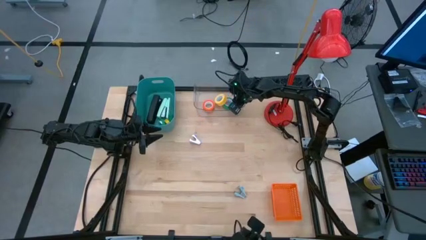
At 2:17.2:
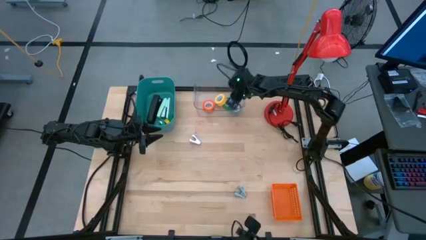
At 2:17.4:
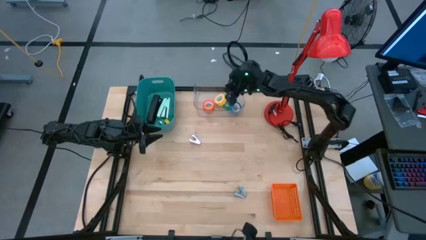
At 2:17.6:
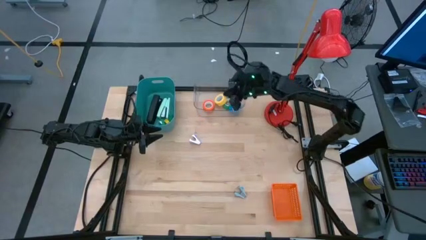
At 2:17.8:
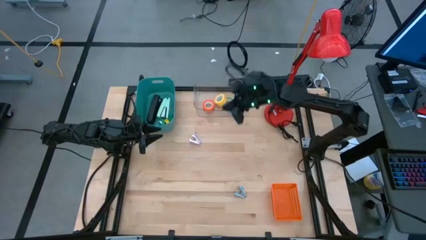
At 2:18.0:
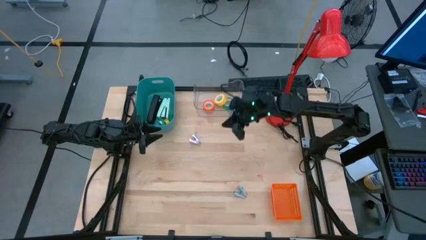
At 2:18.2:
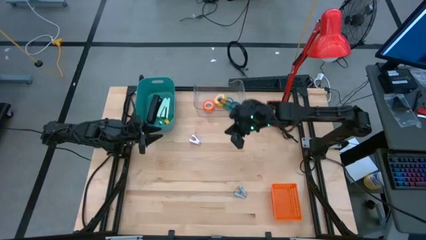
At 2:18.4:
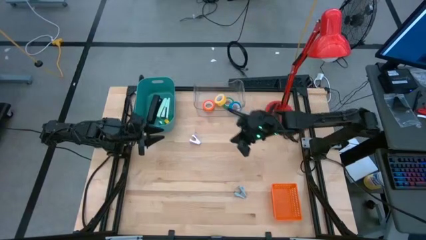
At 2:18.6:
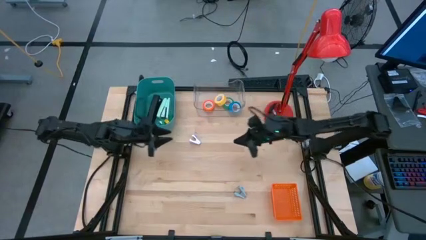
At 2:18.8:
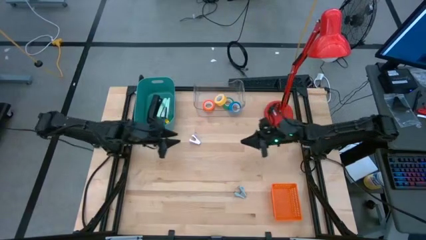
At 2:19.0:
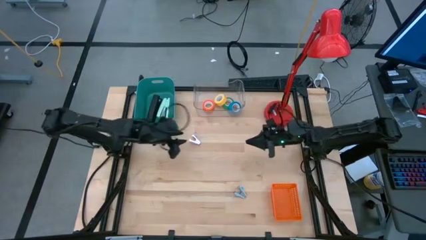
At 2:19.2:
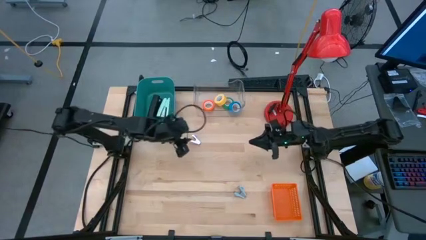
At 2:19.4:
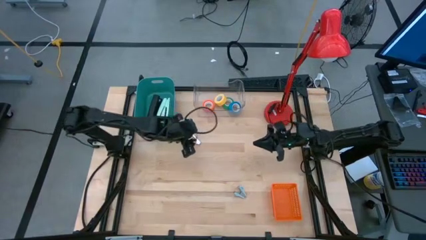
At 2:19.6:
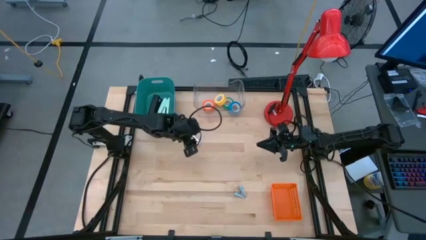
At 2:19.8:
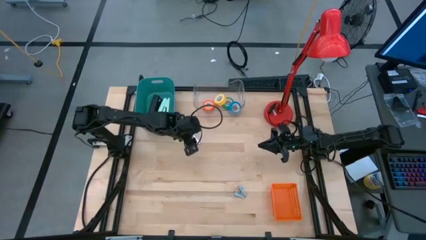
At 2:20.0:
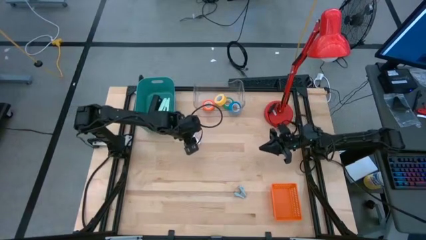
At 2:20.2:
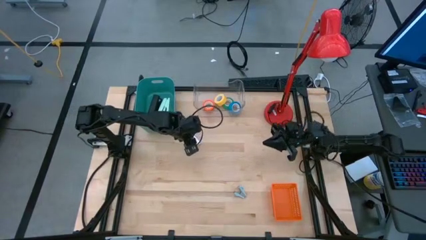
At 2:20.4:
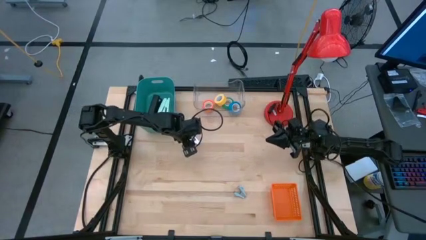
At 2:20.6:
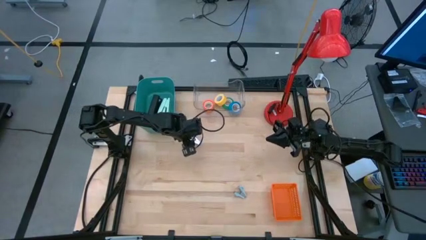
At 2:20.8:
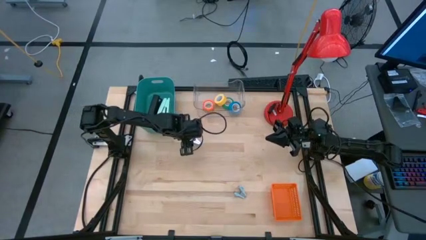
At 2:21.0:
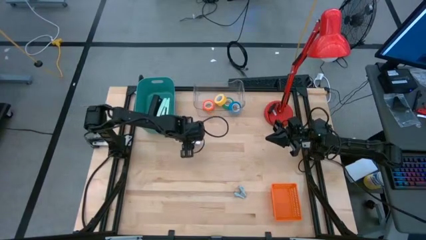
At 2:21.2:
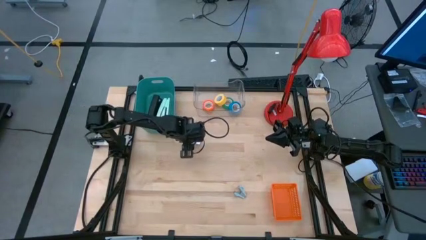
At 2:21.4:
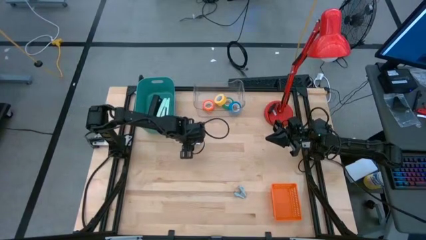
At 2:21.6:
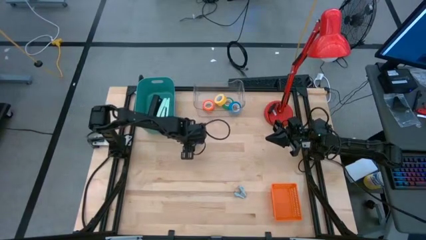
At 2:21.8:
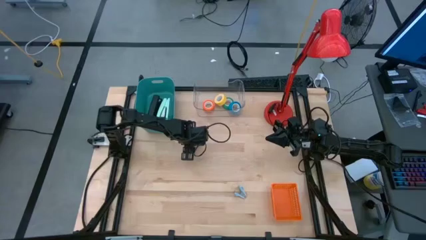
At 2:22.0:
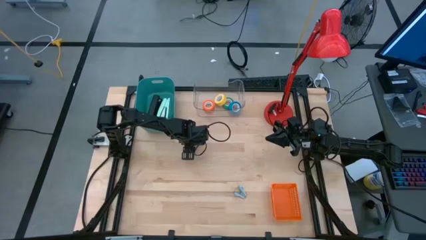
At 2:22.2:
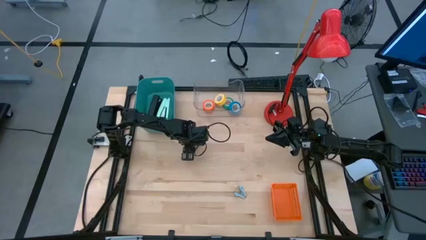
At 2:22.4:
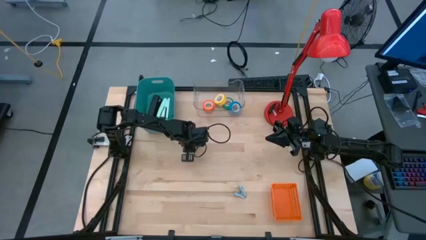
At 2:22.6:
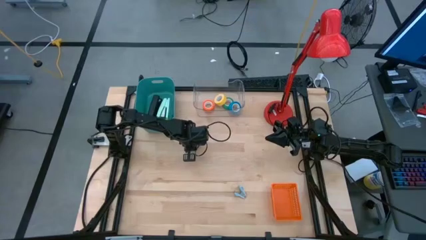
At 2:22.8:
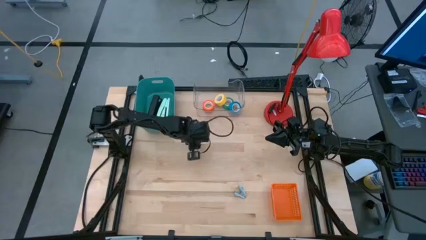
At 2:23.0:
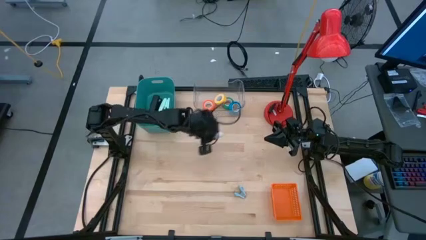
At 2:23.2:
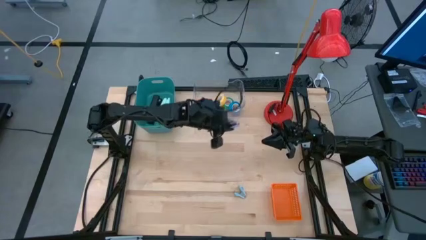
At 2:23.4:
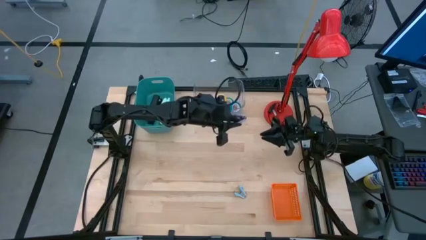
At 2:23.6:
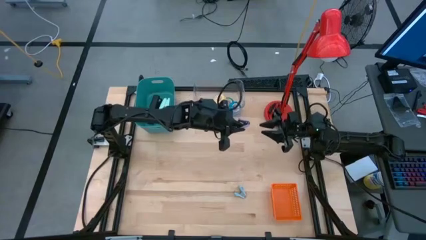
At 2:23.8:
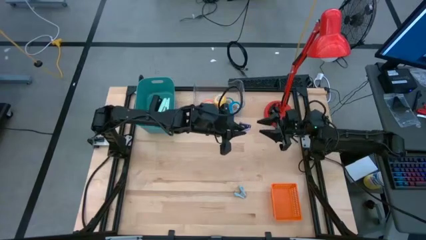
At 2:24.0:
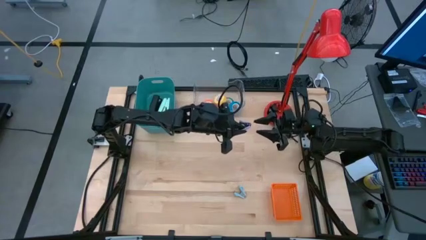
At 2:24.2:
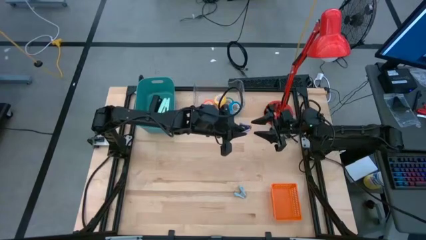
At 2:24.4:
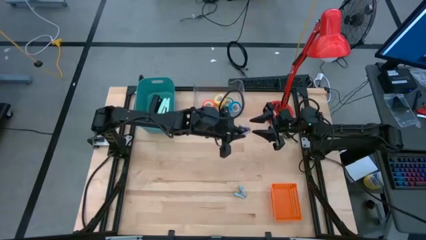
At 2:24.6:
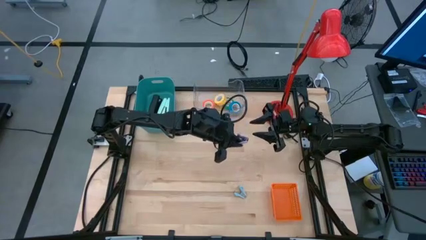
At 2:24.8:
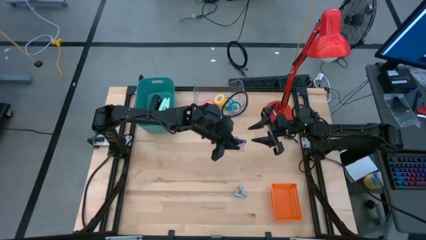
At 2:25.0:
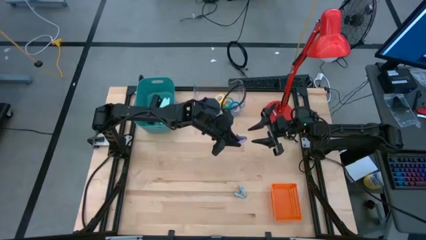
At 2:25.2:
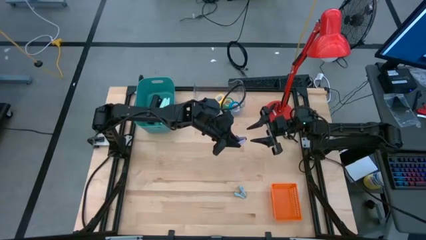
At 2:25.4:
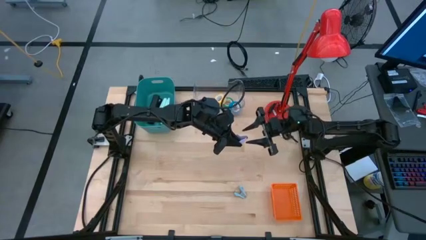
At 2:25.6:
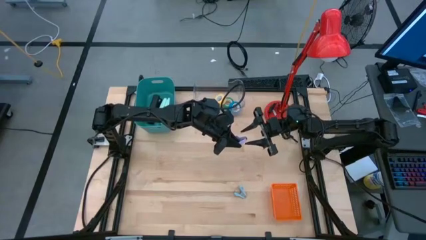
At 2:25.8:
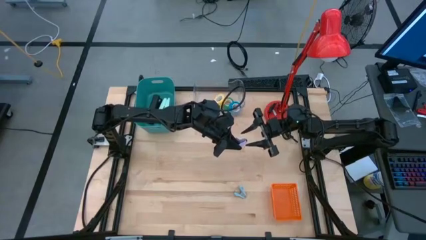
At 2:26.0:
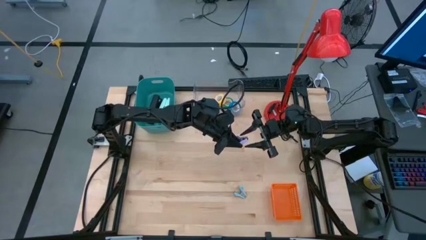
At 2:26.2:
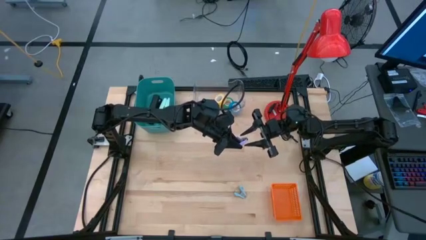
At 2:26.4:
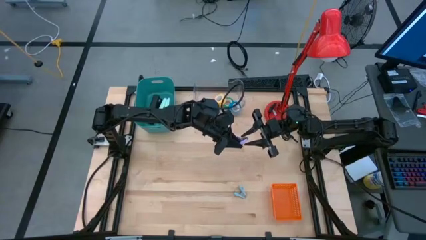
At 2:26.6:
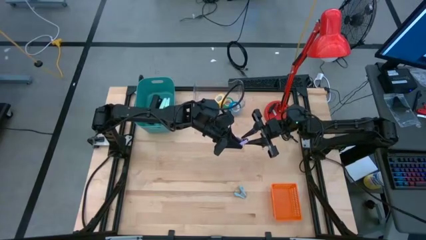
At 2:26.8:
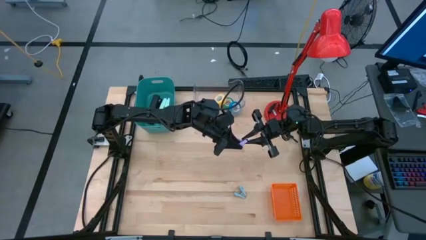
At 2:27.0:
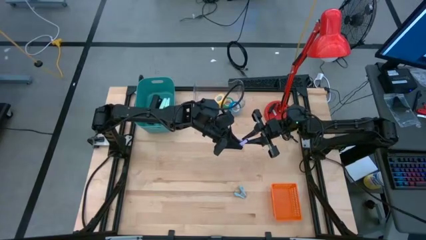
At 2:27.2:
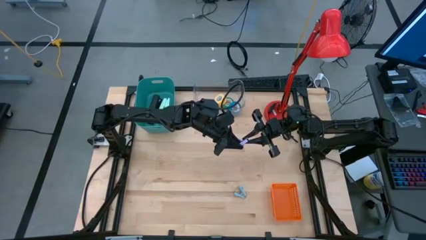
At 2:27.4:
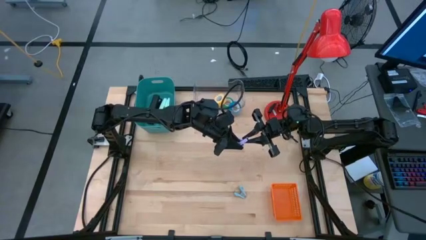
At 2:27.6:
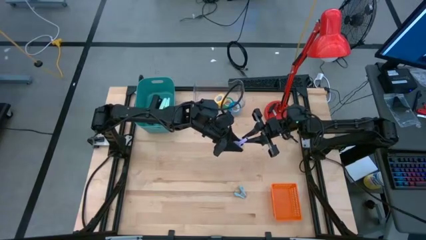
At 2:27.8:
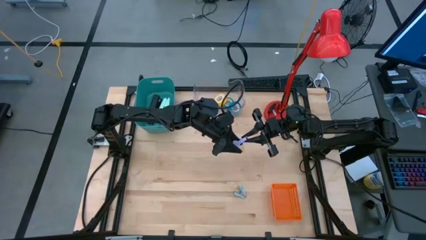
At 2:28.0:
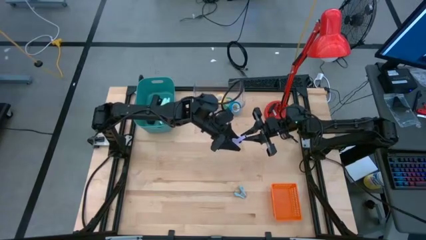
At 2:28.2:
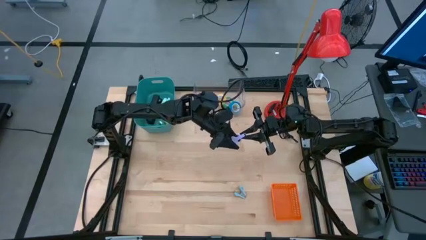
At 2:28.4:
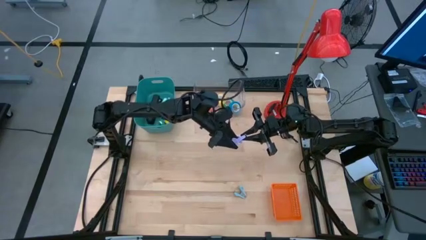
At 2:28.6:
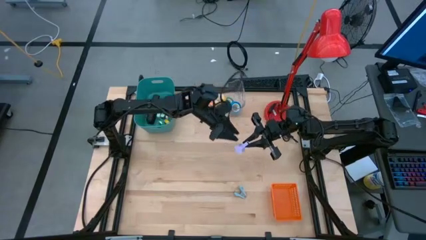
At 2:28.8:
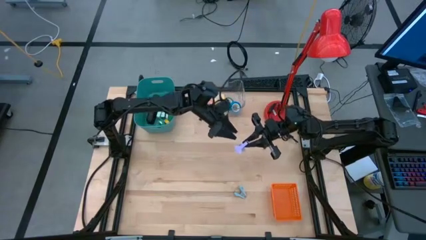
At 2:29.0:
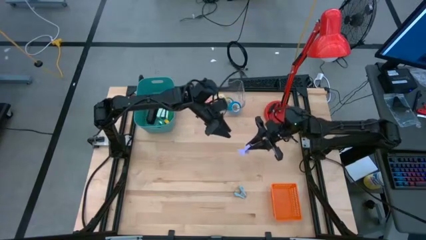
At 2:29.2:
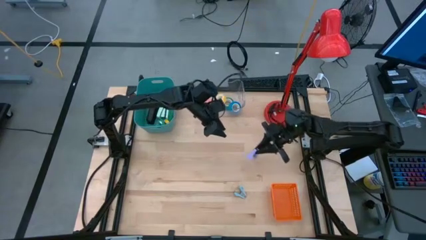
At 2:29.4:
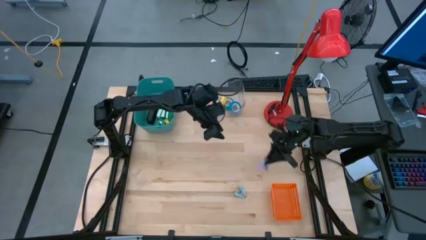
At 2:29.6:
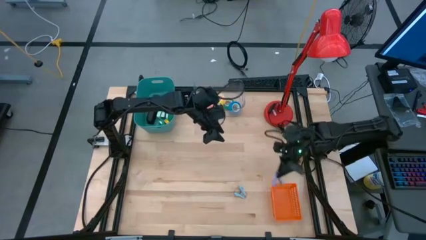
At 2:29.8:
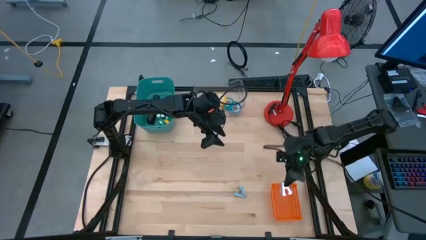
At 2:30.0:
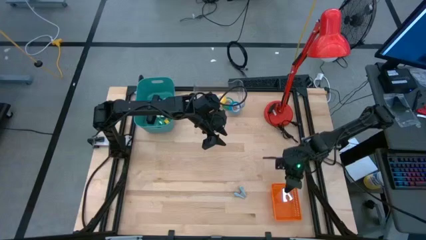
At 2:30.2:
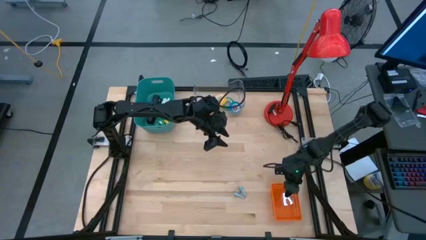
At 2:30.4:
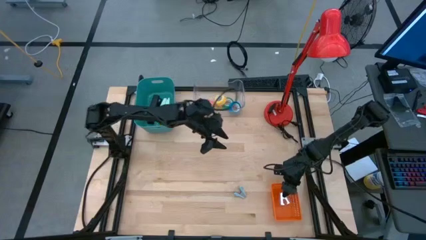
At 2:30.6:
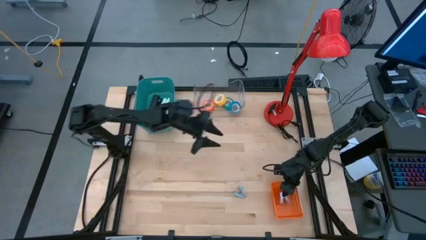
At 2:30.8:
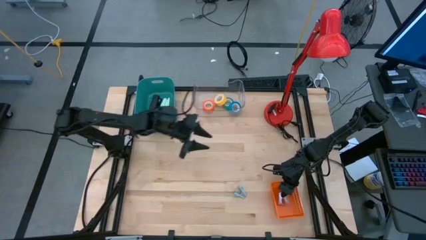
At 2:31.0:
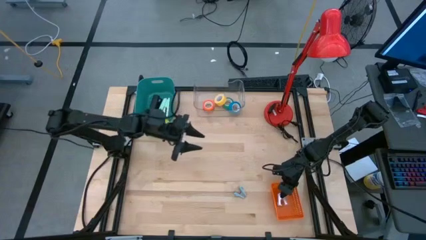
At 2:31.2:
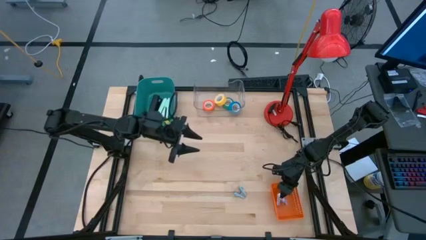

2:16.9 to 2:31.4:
Task: Pick and place Stapler, Stapler remover, tape
Put the violet staple remover into the orange bin

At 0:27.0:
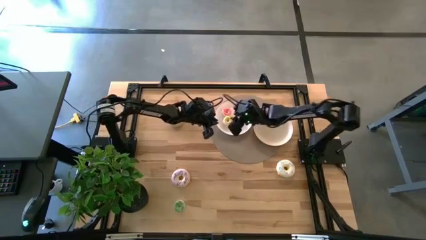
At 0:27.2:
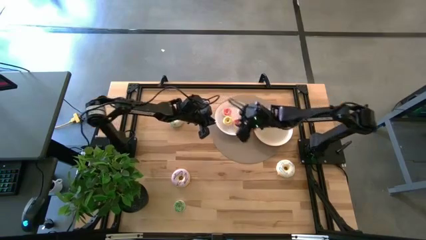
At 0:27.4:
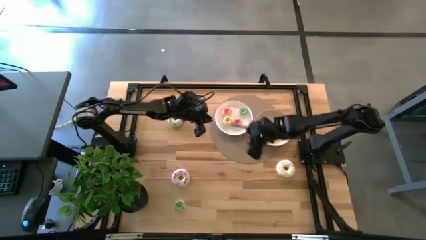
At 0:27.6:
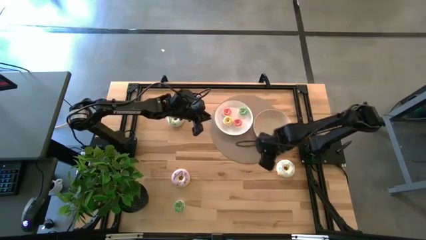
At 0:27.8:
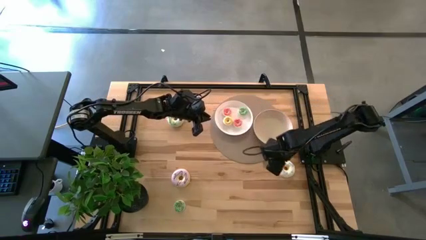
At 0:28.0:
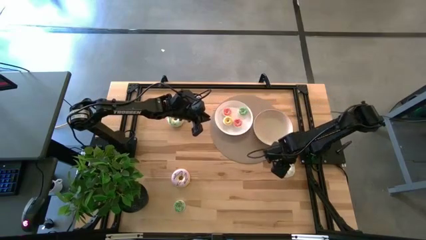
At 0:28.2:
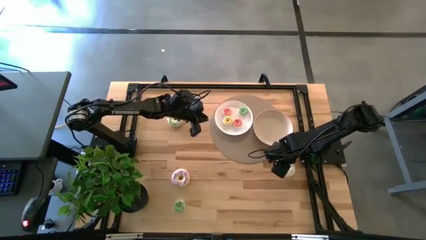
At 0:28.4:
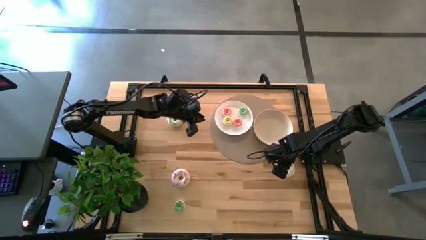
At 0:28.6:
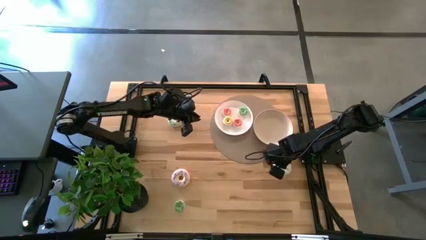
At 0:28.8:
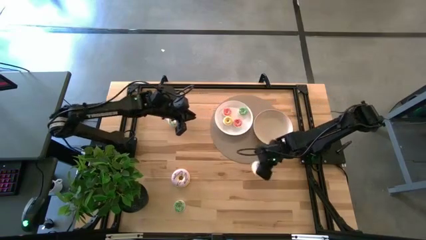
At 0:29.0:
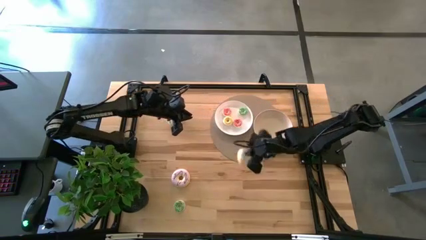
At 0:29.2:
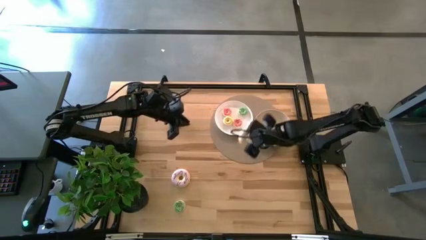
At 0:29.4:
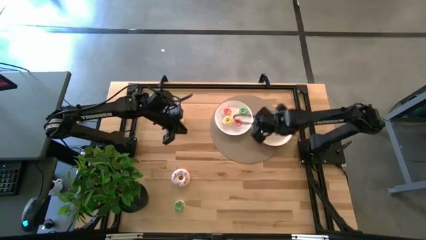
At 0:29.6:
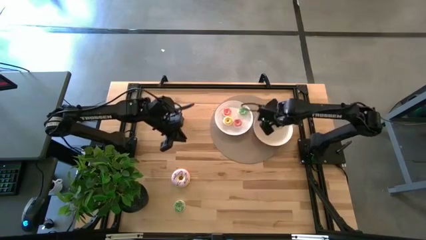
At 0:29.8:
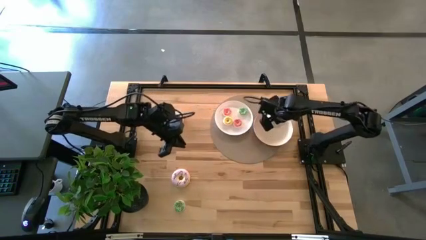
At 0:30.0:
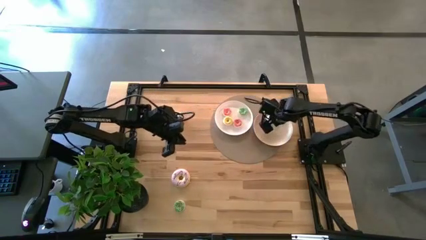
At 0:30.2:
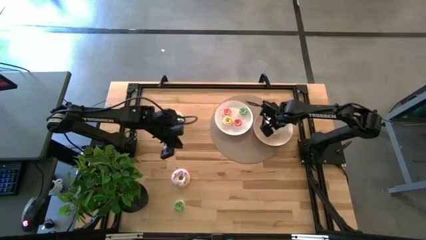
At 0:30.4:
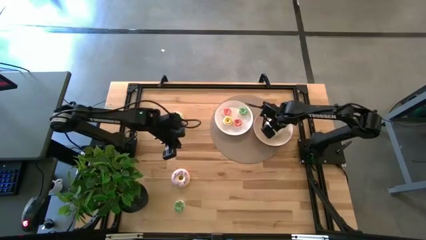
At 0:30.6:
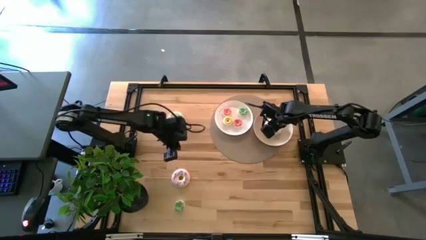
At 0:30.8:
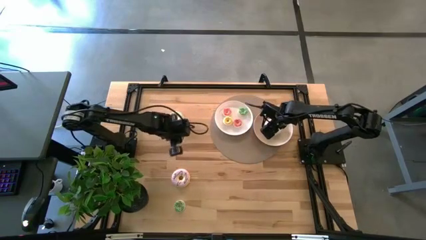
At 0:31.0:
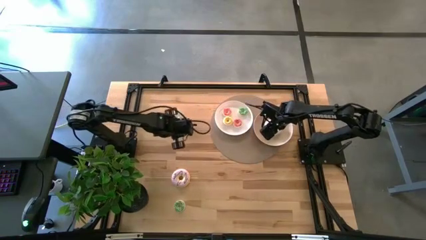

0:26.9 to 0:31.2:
Task: Pick & Place donuts
Put the large white donut on the brown plate
